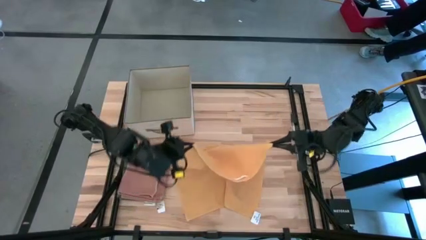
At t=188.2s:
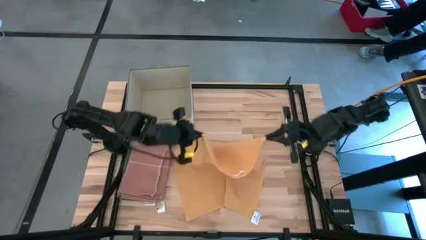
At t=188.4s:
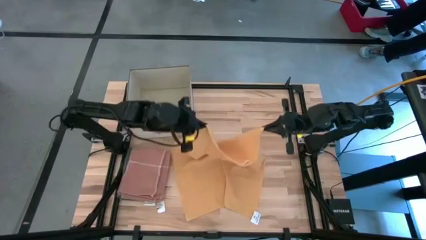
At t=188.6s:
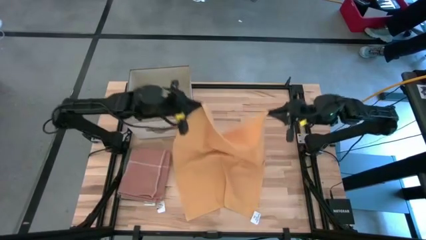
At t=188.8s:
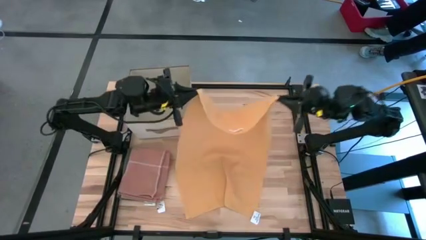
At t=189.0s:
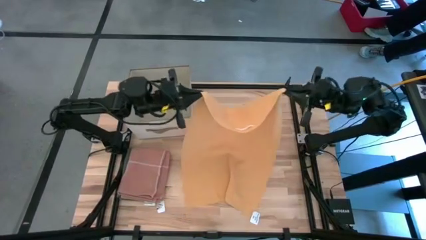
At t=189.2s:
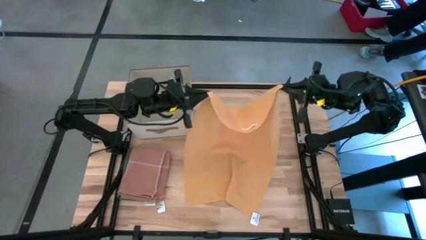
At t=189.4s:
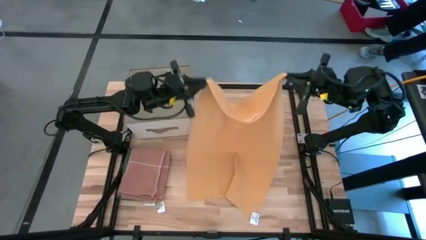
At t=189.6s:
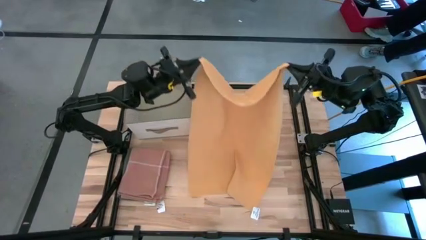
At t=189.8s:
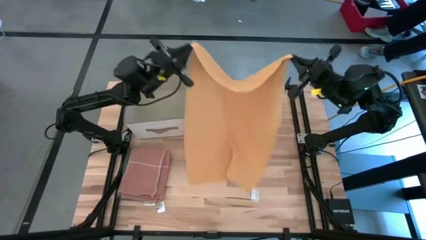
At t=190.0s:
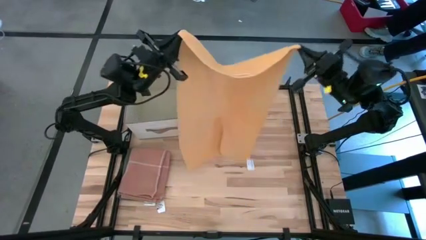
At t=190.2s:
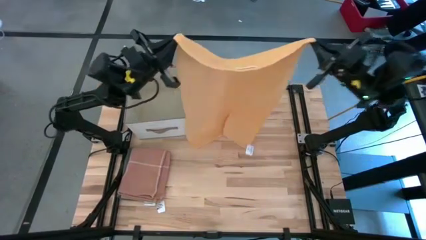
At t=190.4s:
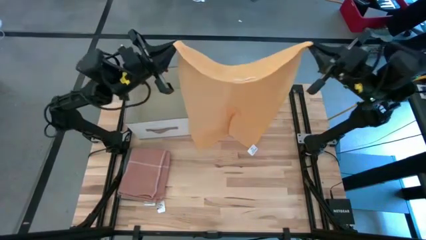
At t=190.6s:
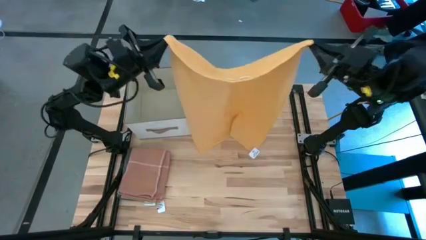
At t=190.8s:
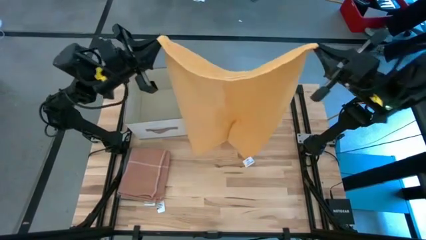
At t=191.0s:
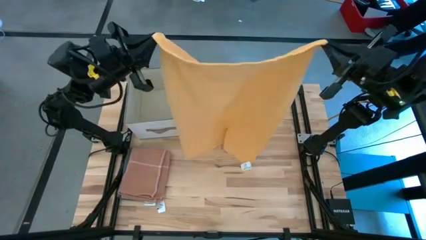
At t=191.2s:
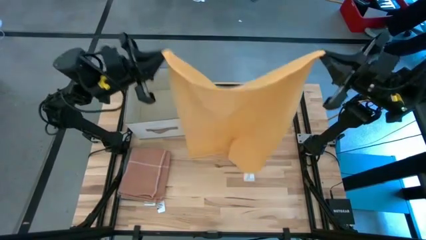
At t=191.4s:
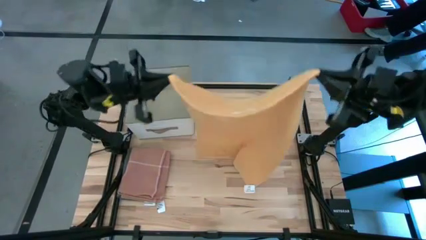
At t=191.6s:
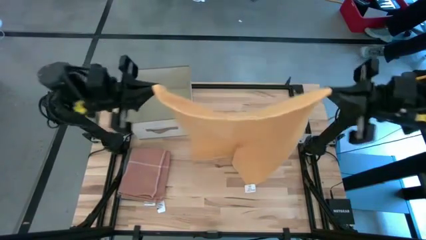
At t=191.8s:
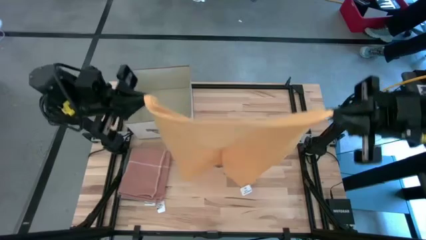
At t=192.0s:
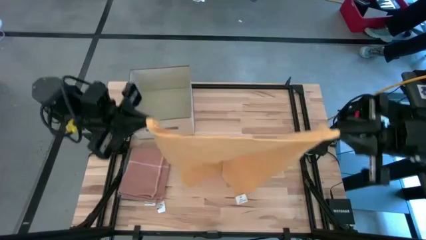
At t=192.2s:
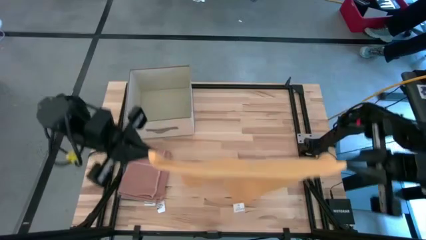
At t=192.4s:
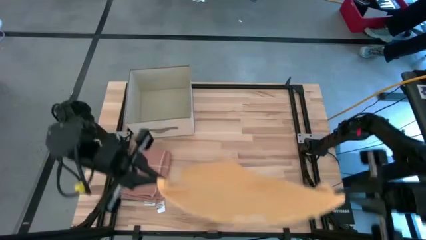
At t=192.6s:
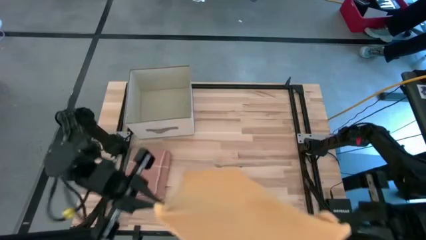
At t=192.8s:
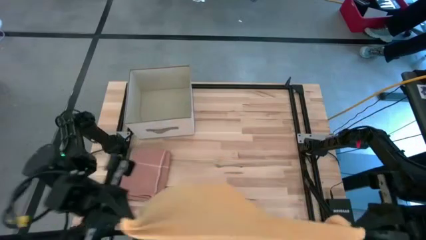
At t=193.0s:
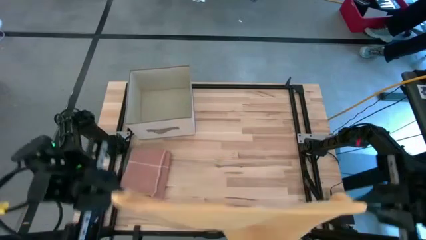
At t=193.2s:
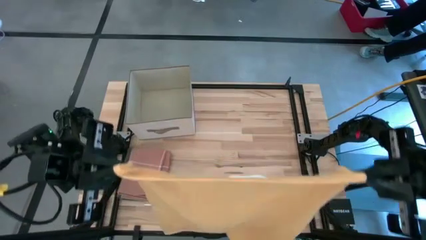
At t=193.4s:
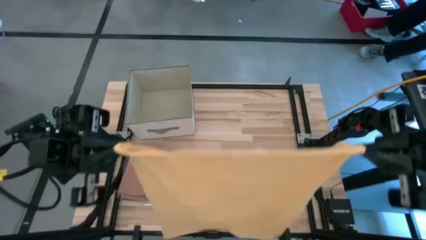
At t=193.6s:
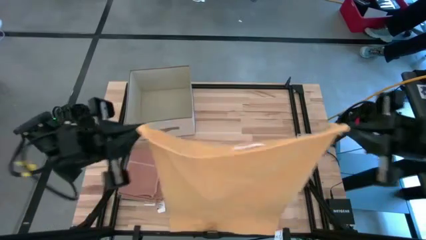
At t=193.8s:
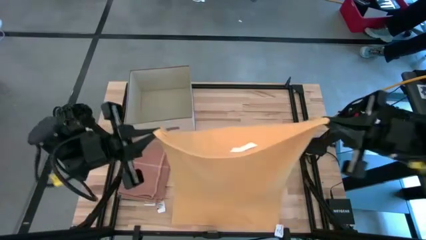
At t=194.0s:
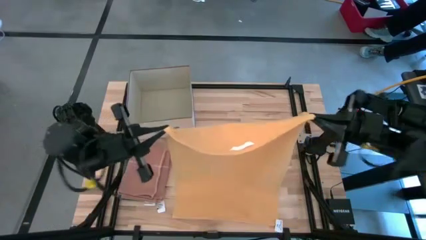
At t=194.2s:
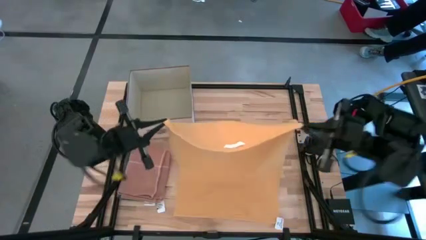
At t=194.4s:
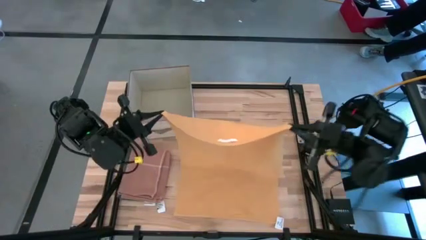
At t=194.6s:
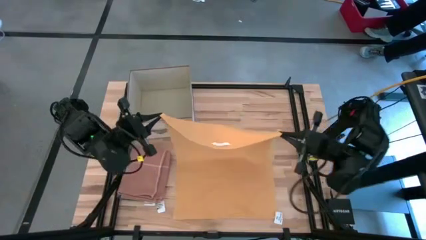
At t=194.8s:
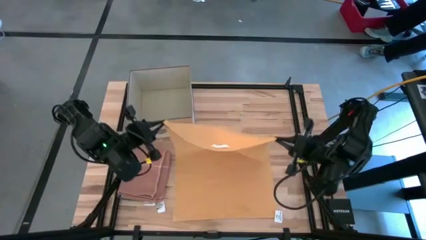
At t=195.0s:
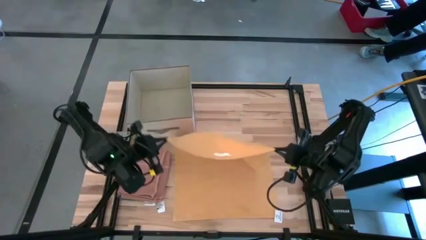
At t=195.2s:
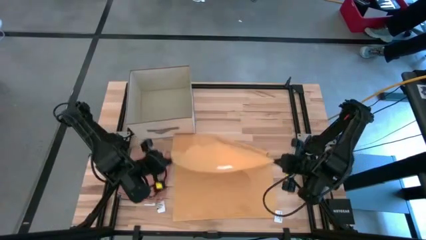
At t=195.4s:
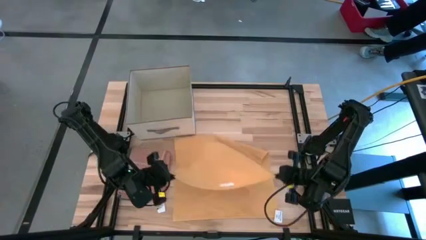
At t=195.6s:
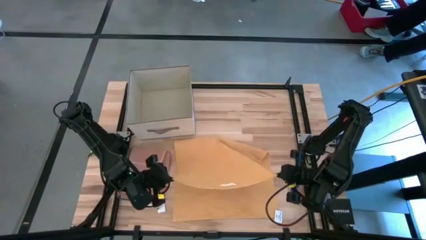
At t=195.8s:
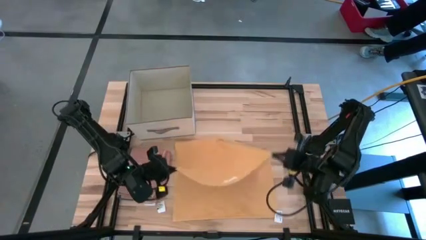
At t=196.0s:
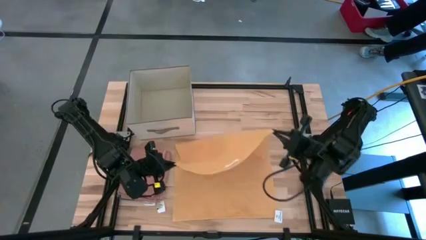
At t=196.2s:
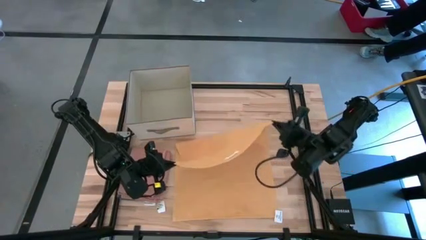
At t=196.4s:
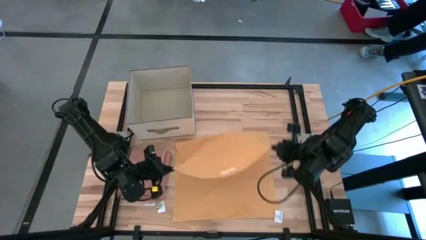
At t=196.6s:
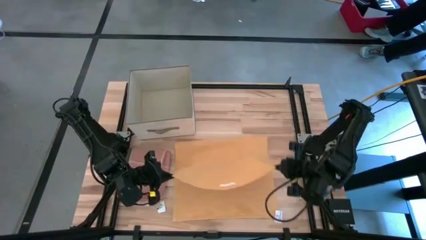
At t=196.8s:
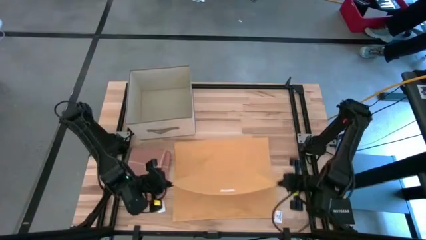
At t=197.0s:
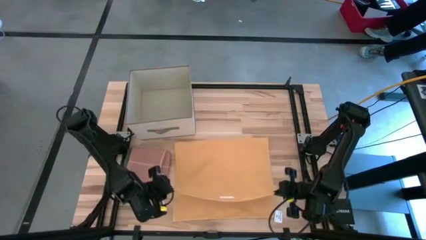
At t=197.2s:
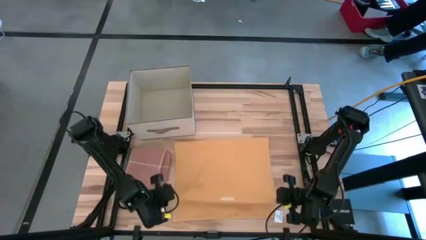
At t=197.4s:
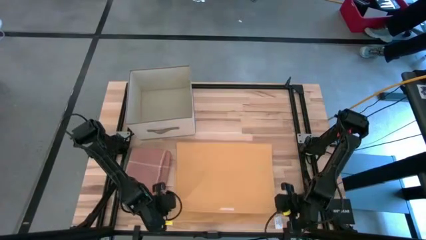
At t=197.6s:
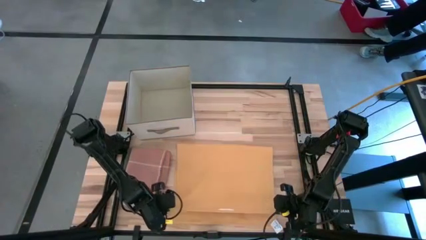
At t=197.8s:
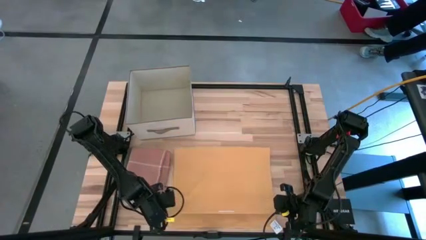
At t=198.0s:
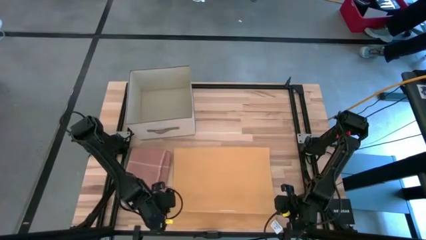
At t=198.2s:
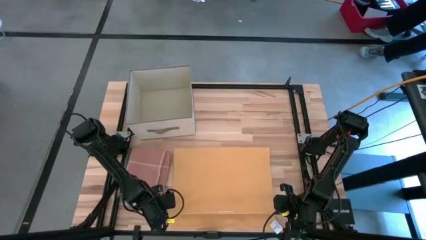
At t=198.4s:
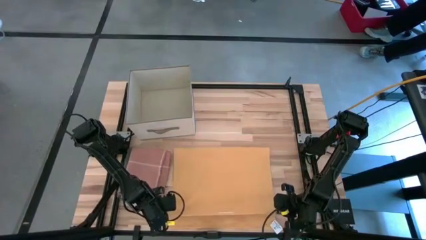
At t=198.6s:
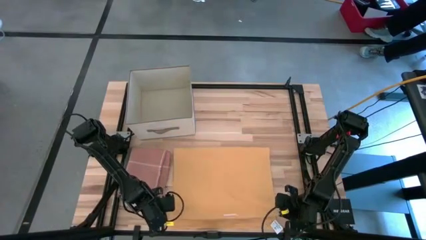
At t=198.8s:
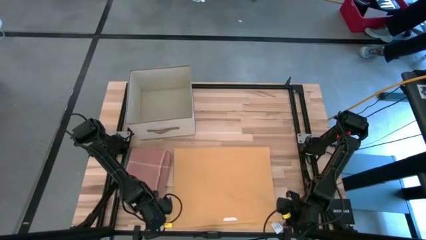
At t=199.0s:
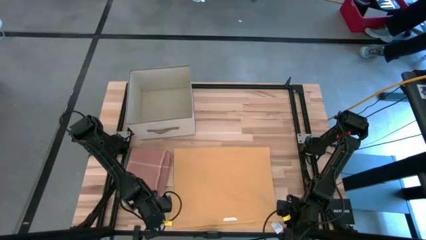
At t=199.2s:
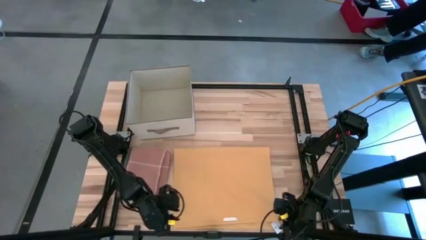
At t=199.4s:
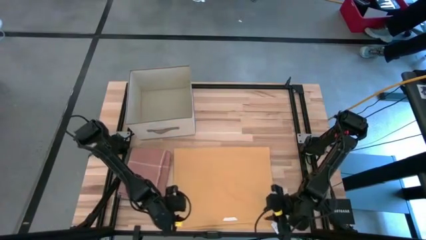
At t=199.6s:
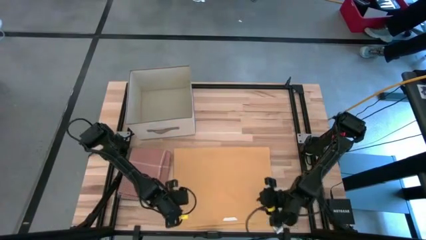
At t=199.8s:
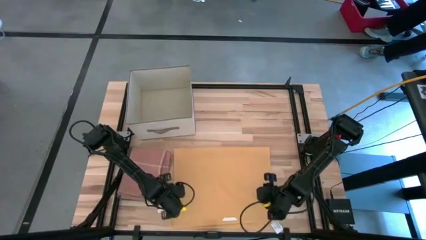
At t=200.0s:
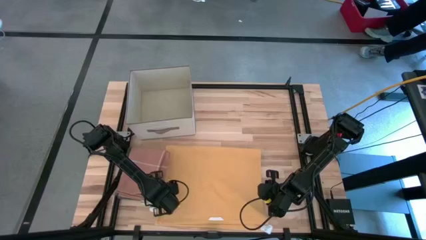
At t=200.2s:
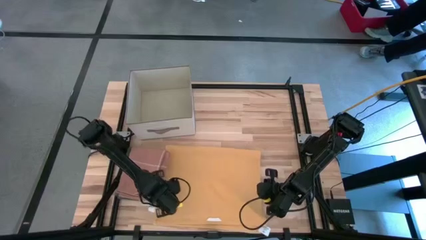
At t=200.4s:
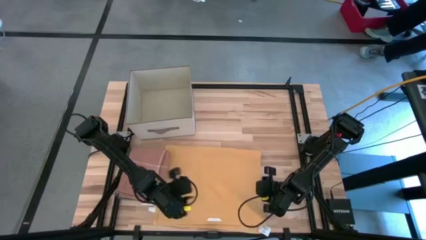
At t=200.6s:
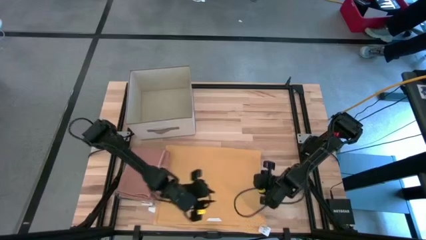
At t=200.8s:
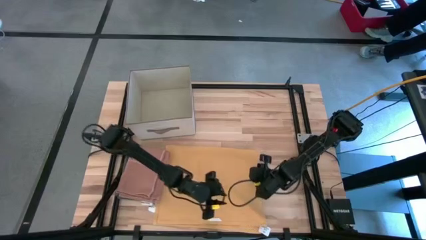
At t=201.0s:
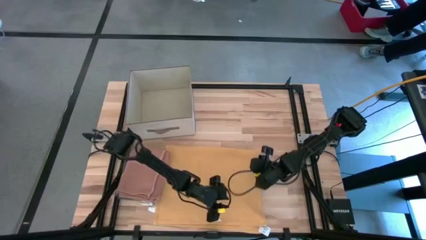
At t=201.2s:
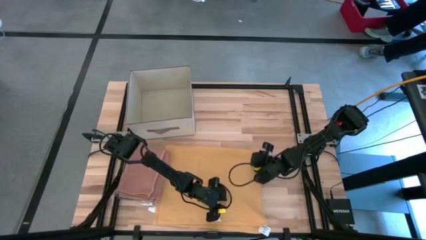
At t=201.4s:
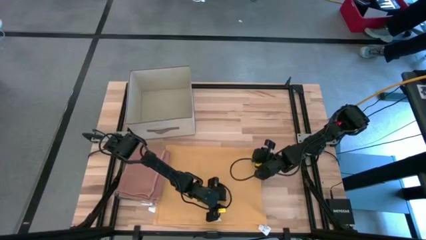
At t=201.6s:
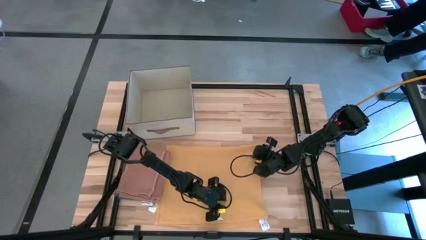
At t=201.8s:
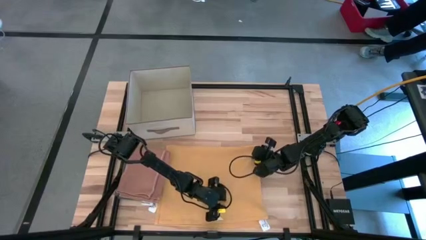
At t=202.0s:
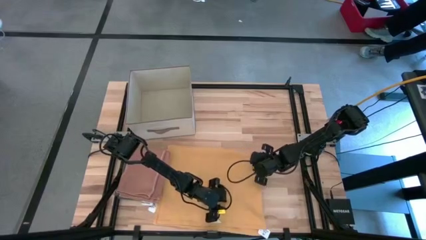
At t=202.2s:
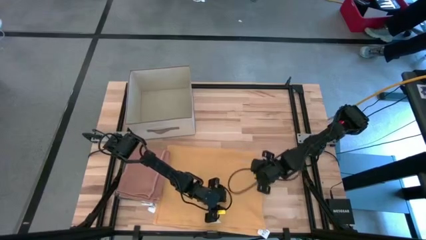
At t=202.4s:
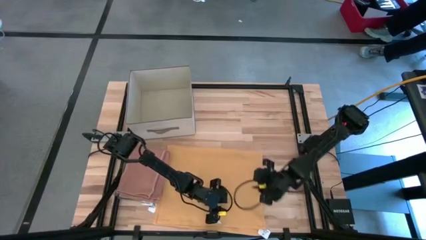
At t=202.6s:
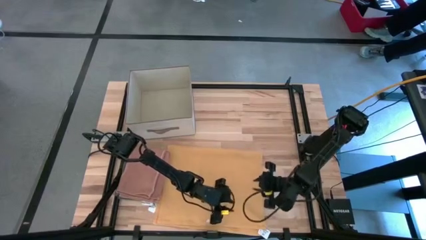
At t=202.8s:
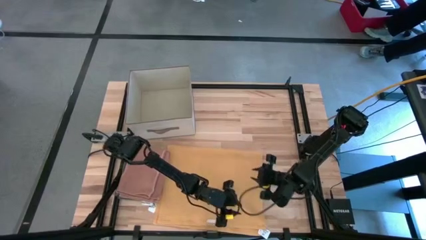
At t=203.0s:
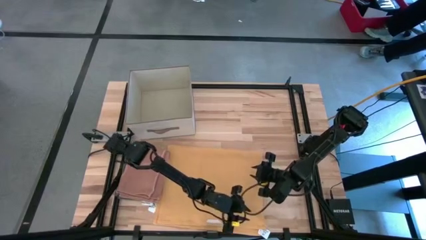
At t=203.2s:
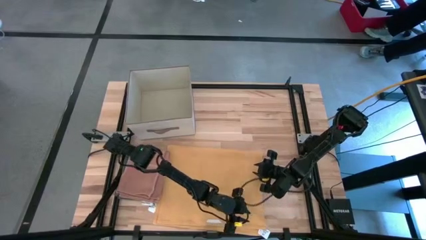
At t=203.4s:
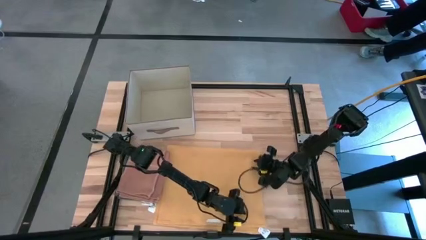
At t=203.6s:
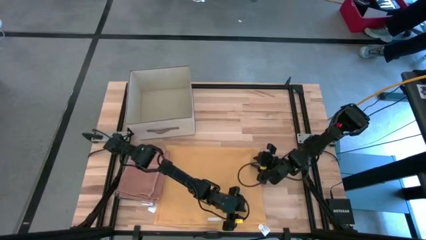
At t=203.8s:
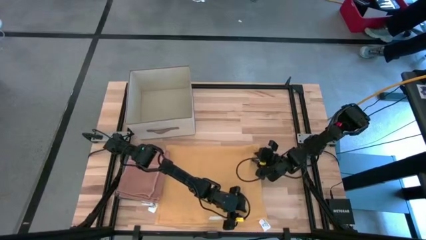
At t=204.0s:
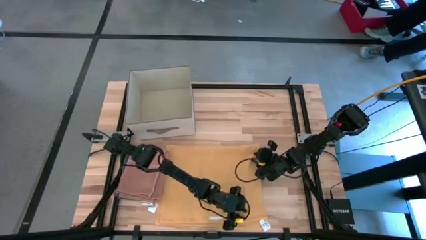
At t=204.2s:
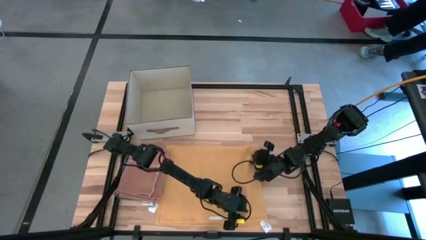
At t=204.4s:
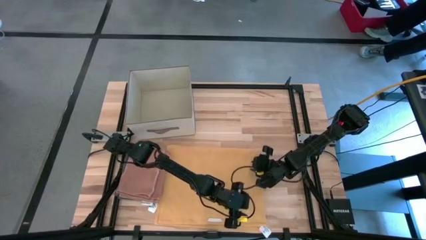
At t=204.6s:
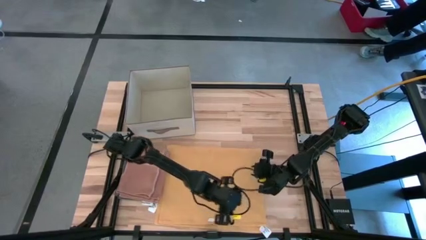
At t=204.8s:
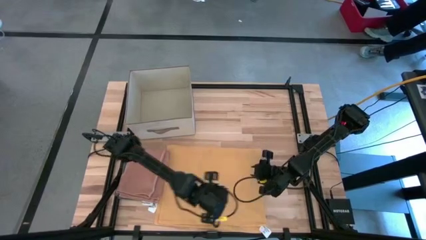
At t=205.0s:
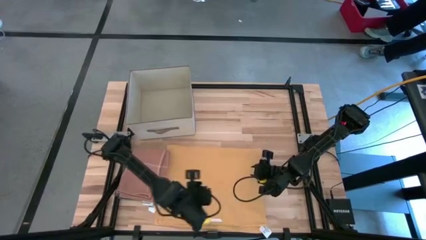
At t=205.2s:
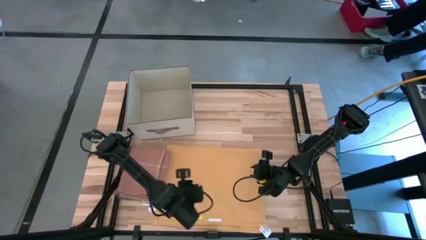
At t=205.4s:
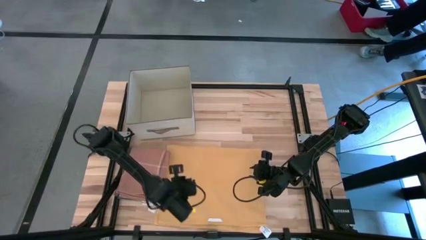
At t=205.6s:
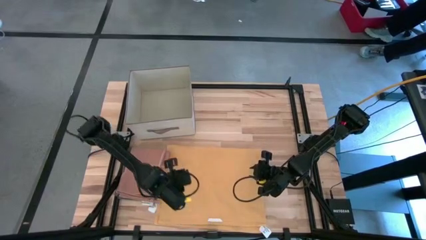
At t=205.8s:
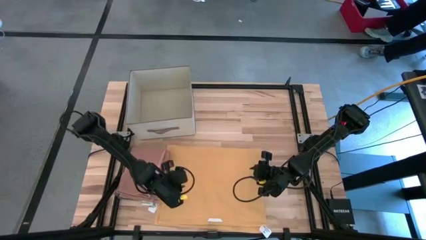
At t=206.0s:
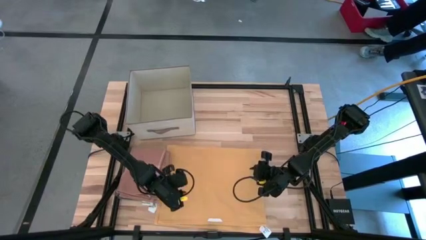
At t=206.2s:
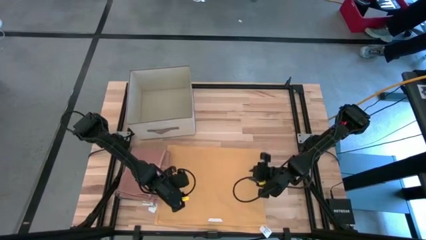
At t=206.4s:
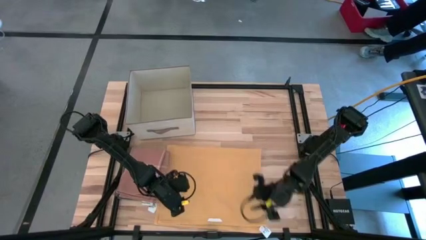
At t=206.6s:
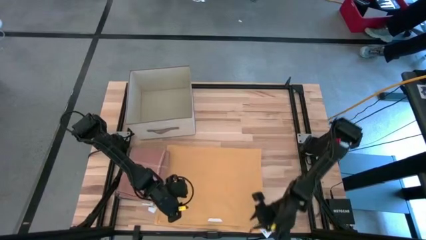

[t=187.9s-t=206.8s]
Task: Fold towel
Fold the yellow towel
